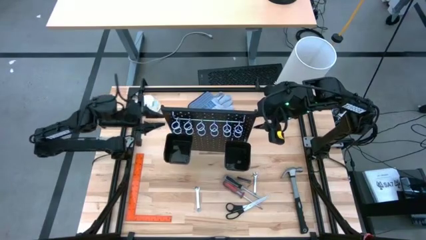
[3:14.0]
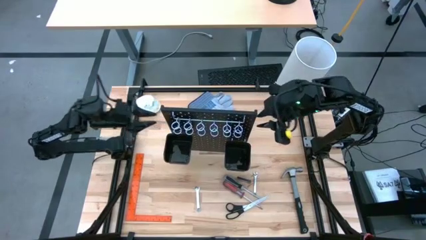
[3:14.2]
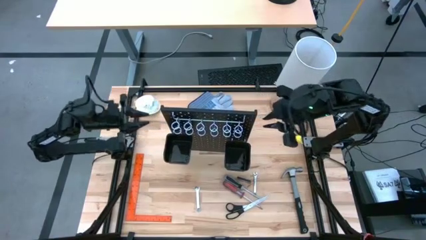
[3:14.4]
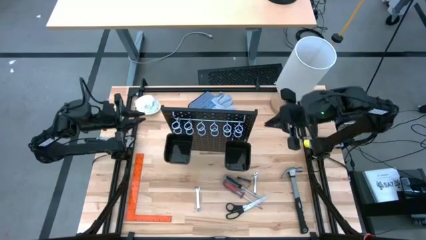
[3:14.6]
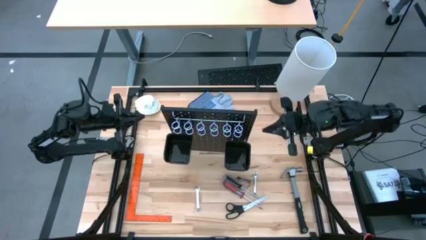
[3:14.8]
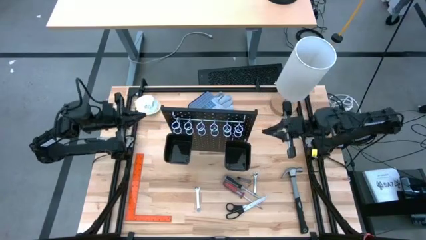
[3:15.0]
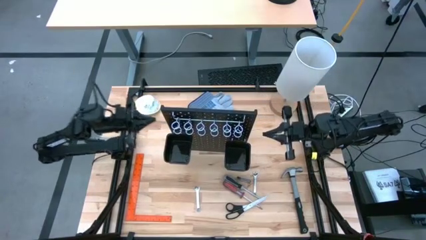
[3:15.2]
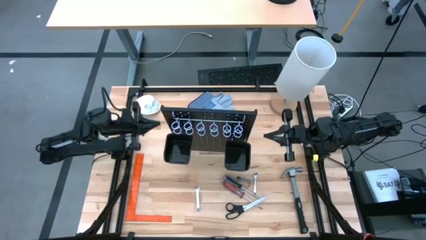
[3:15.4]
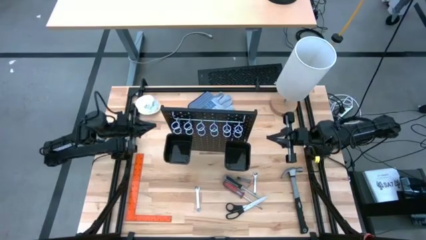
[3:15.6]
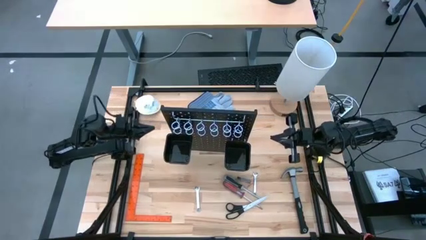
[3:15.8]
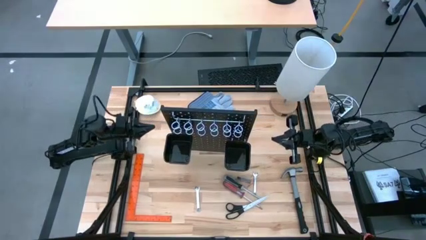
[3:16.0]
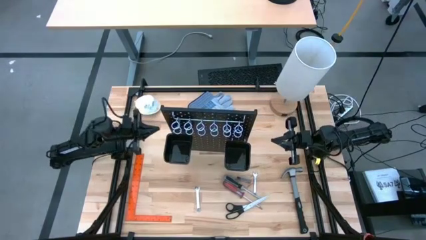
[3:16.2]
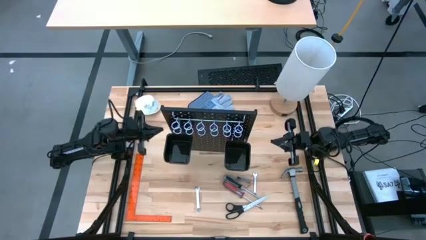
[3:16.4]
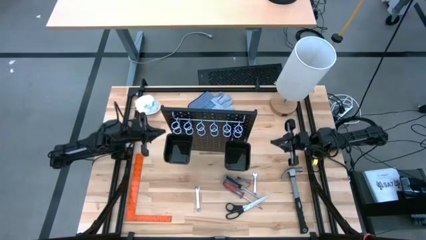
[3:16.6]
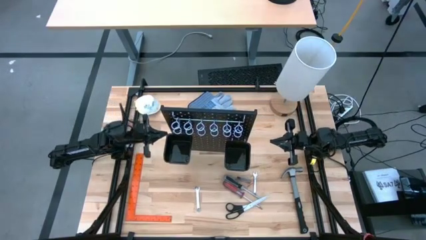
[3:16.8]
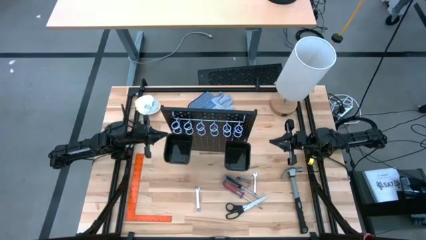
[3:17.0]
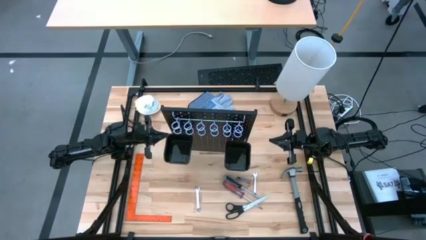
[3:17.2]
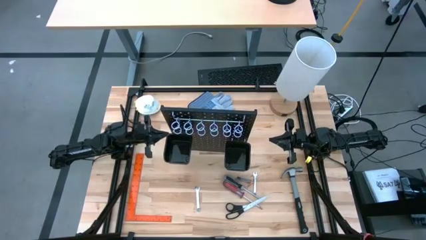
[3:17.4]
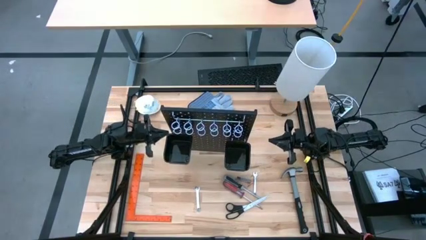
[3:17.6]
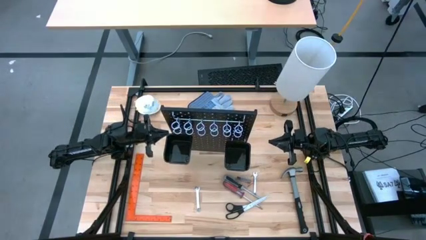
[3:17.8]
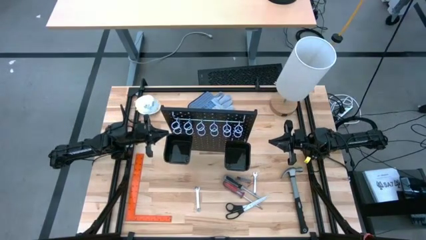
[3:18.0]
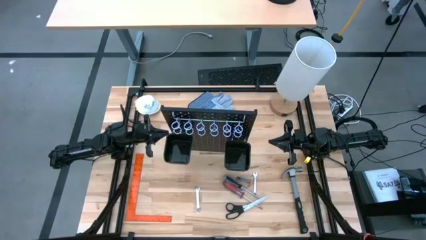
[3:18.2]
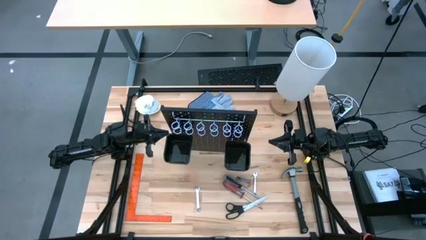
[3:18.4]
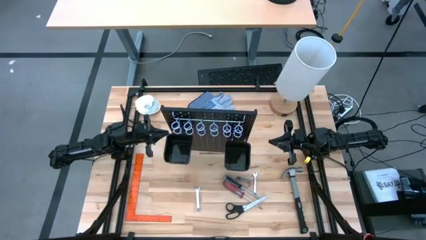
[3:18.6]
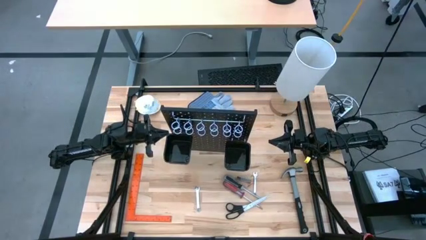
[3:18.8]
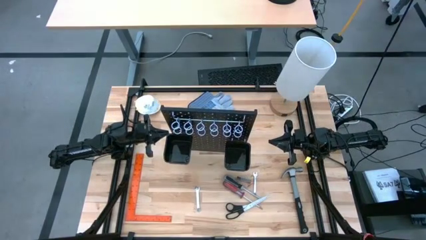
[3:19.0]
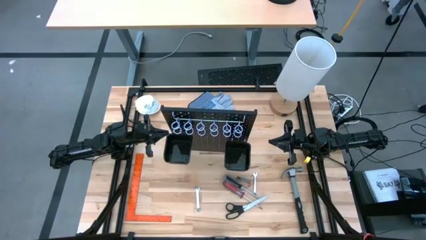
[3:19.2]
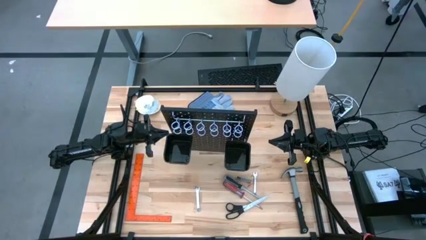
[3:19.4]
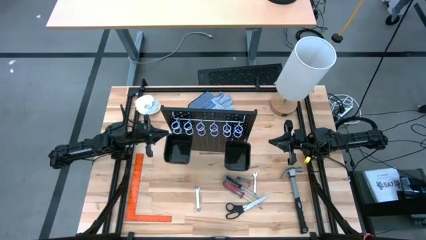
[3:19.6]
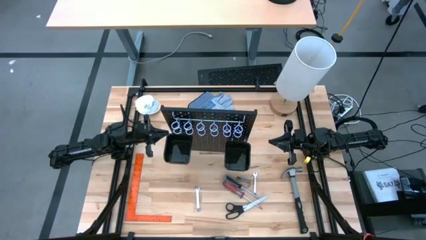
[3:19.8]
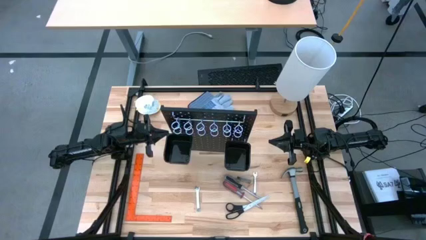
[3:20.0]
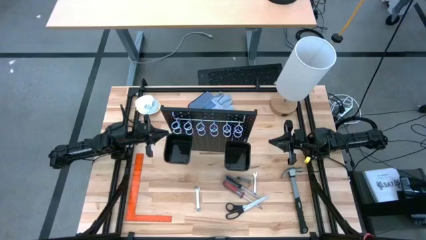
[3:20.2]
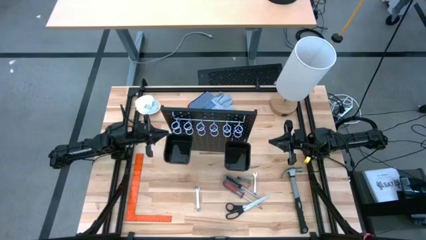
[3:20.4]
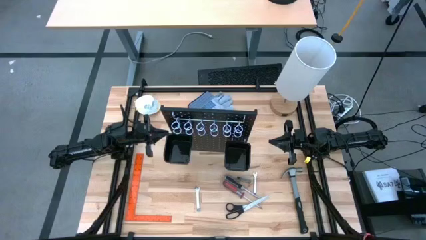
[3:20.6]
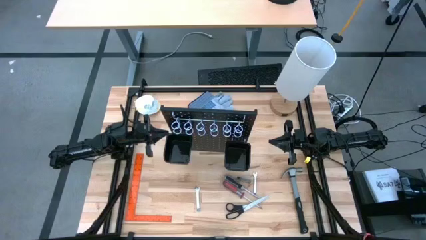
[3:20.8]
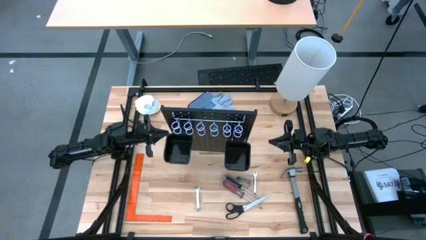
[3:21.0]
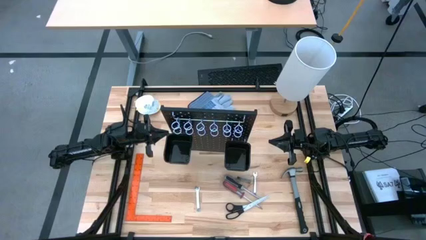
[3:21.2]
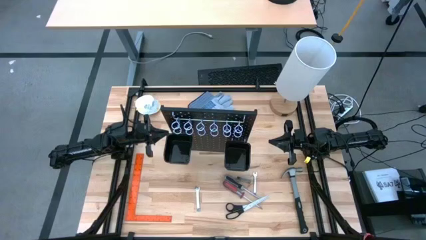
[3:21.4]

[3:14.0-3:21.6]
Task: Hang tools onto peg board
Return to Home Position

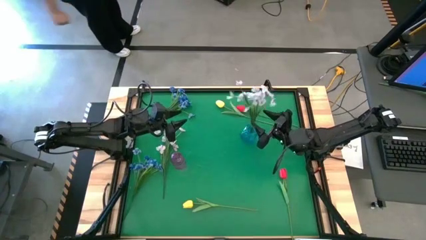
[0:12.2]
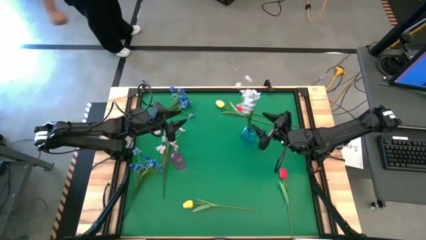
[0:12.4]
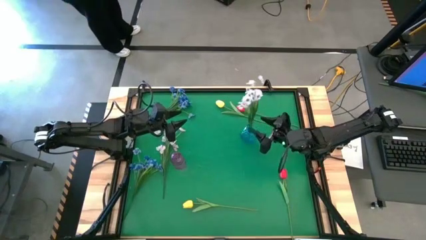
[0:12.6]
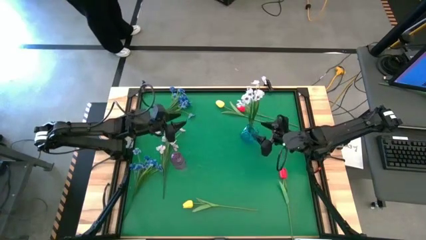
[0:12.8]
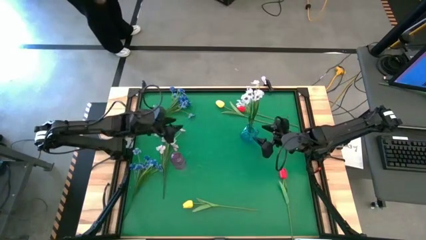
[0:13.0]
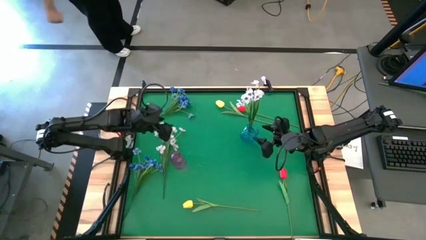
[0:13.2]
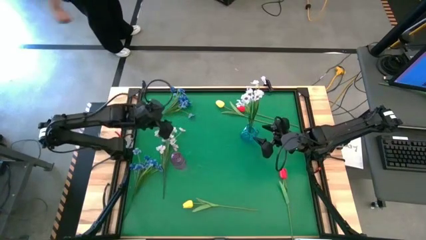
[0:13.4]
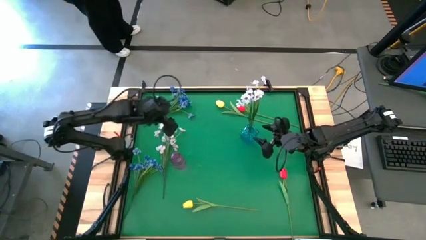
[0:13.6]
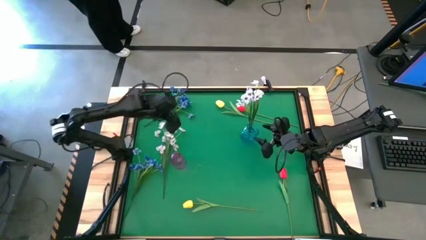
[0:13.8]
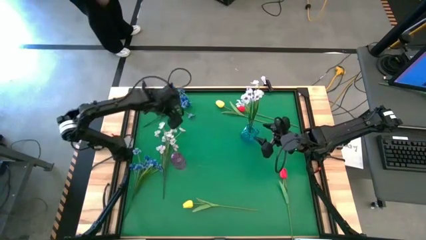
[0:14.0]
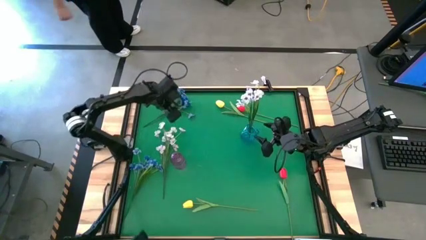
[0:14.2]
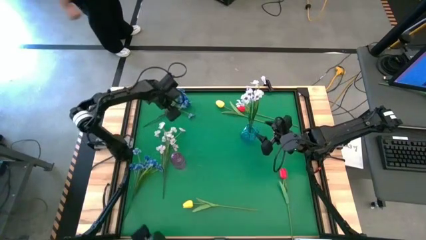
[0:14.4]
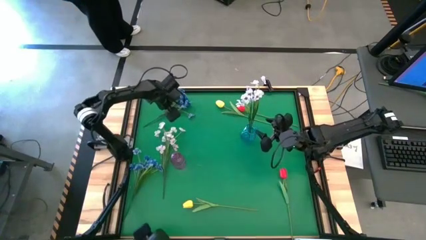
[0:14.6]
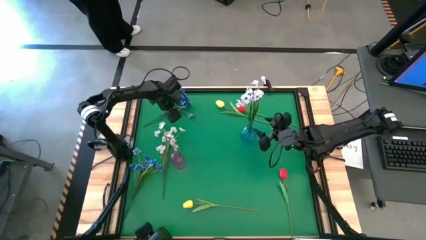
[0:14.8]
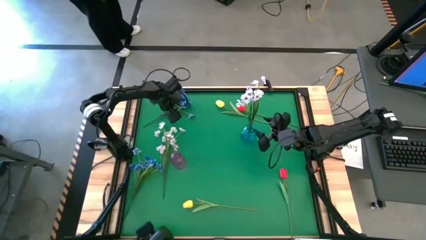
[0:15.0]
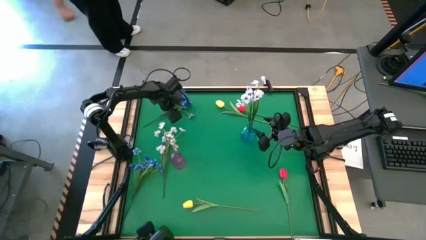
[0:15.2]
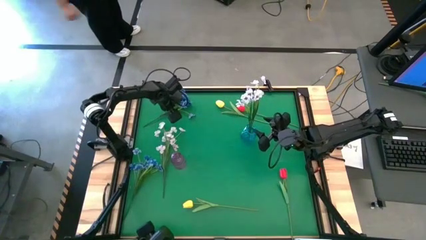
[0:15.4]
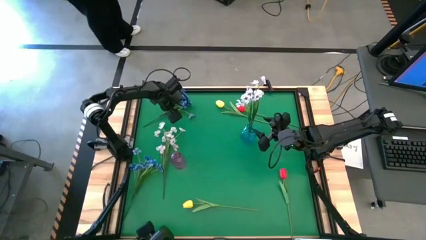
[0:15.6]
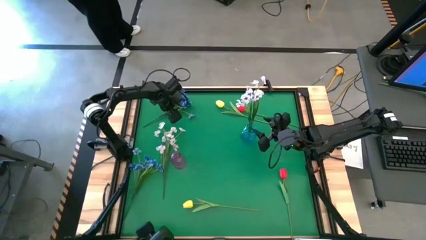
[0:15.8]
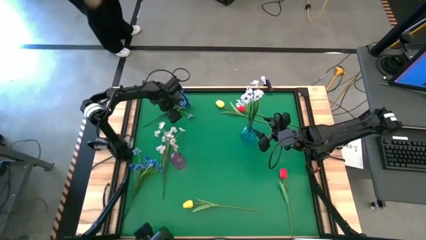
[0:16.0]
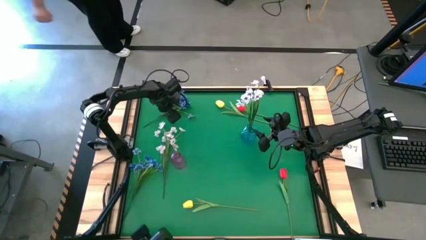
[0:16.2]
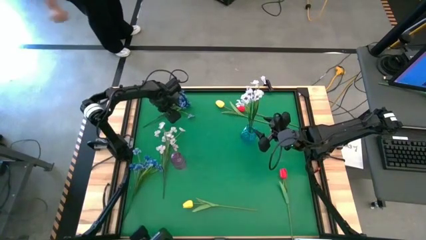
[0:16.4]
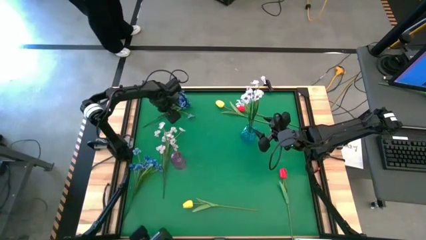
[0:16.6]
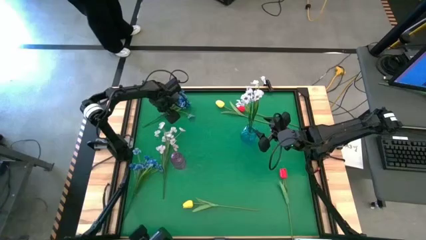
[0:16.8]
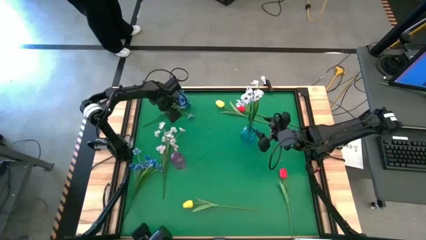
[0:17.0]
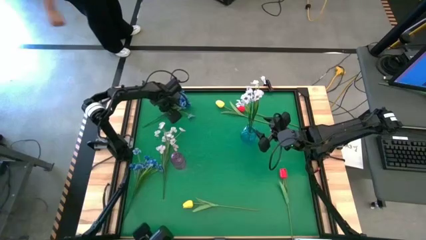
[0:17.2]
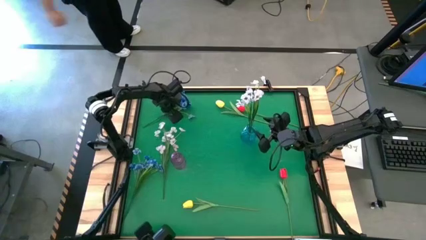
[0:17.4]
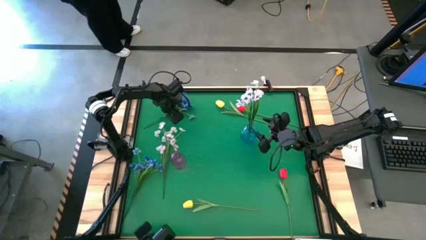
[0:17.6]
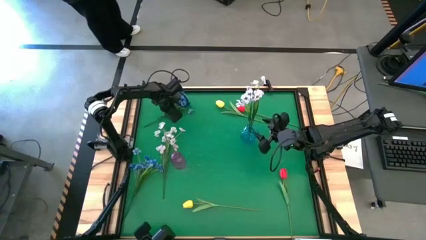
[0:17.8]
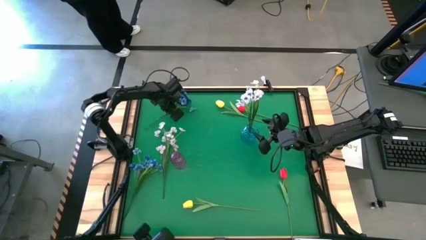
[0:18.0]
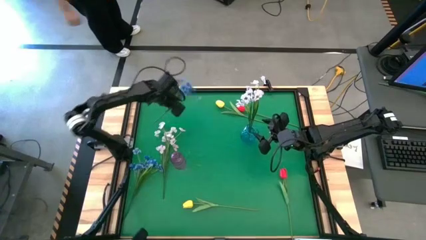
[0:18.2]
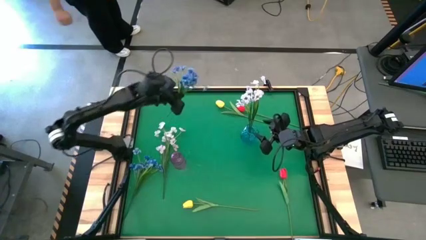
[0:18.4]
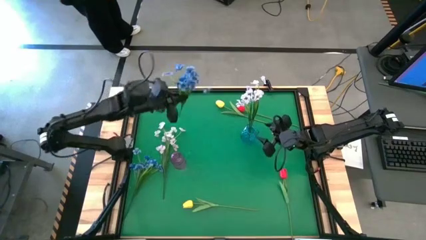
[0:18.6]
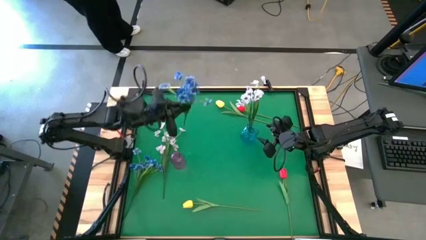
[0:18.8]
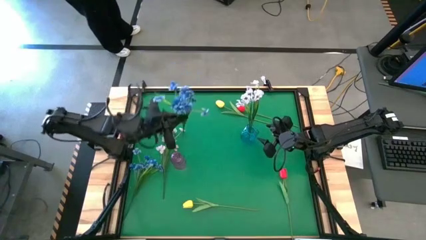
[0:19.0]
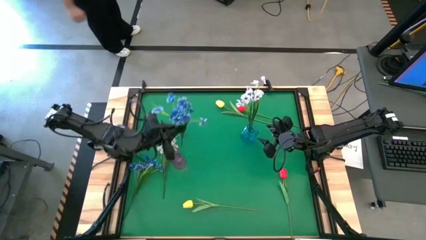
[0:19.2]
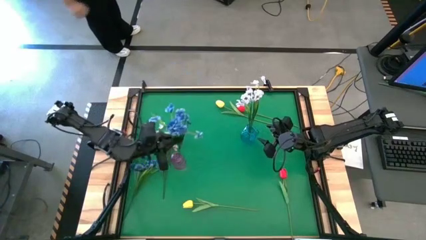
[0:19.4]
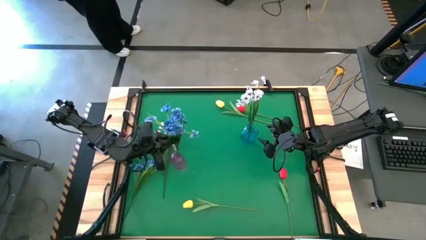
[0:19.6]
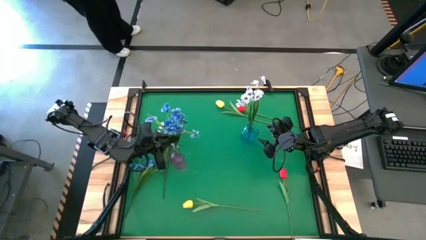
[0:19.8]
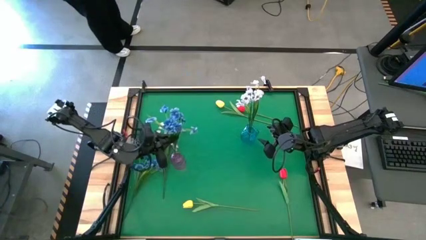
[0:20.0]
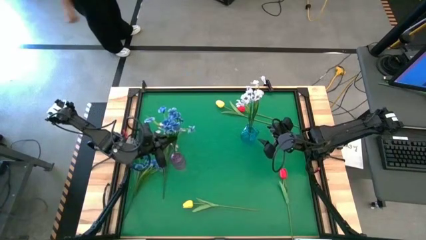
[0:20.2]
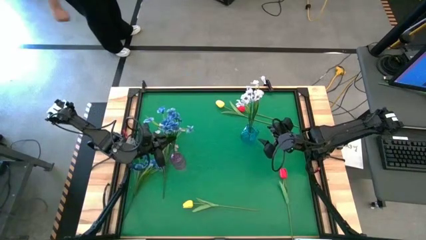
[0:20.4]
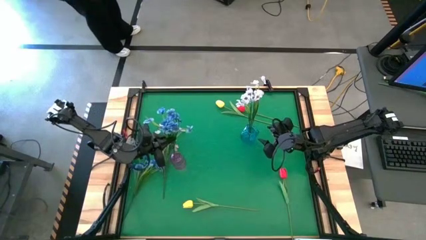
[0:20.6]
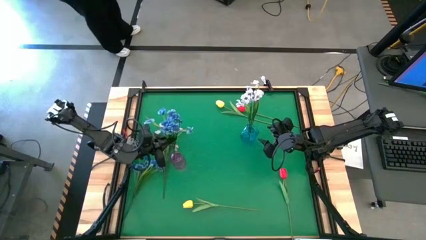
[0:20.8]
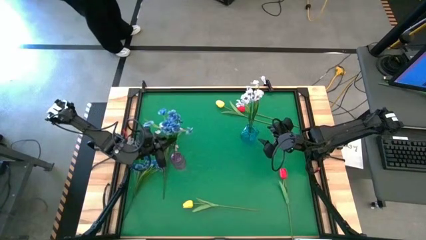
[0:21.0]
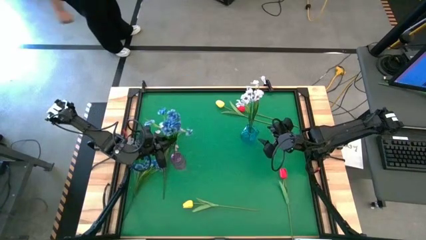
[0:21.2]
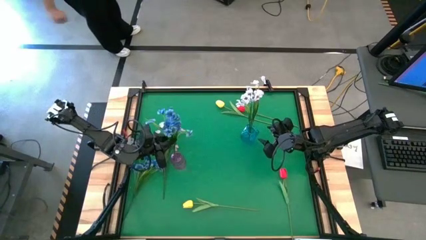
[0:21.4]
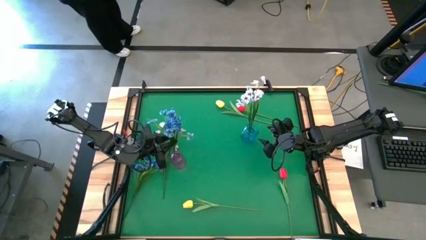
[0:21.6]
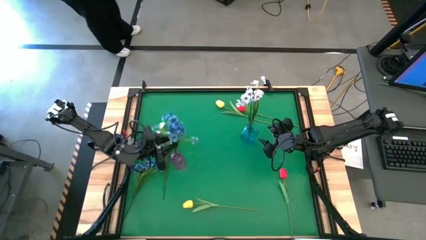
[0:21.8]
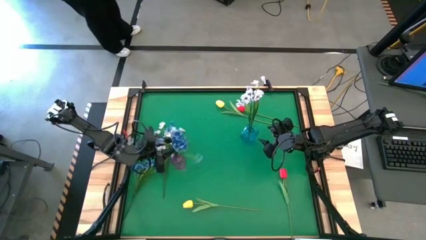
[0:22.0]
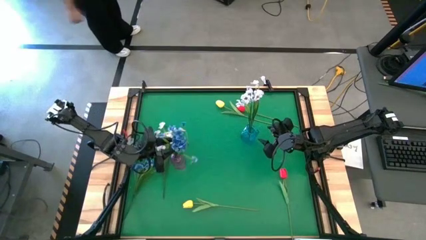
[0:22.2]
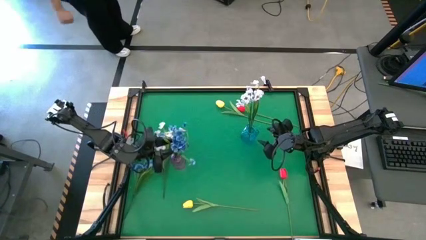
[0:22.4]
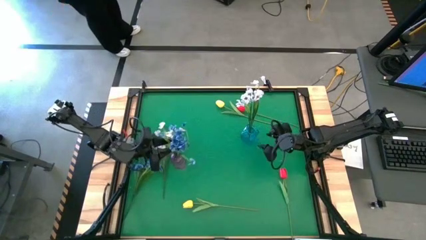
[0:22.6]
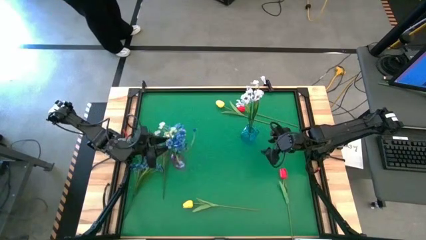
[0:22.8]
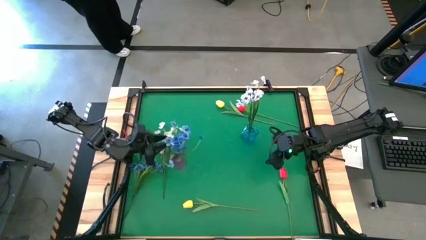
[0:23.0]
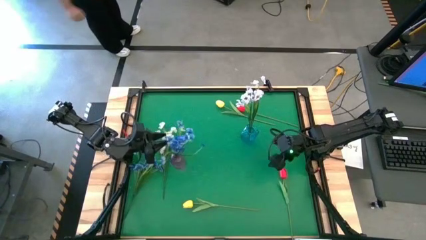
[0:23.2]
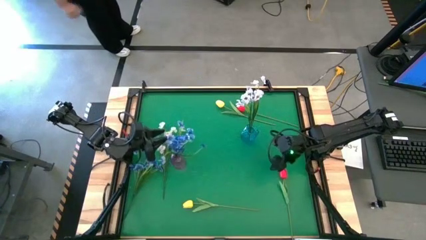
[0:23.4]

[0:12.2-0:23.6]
Task: Sort flowers into vase by color
Put the top blue flowers into the violet vase
